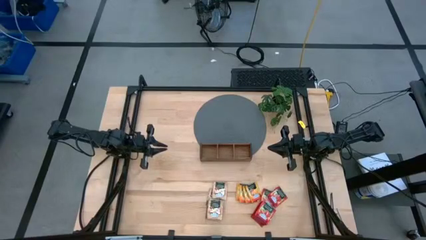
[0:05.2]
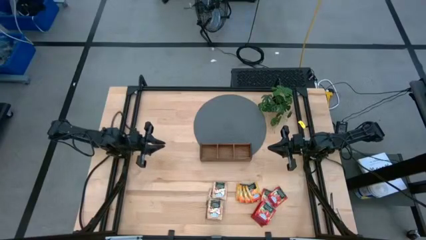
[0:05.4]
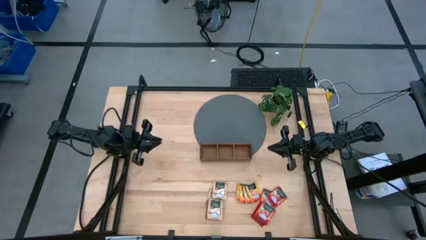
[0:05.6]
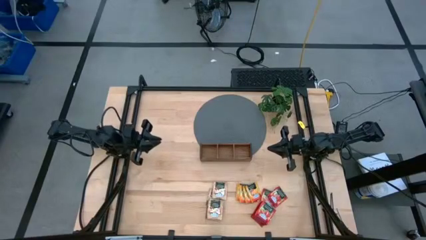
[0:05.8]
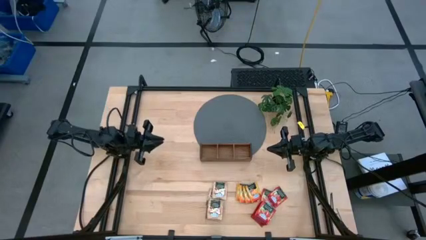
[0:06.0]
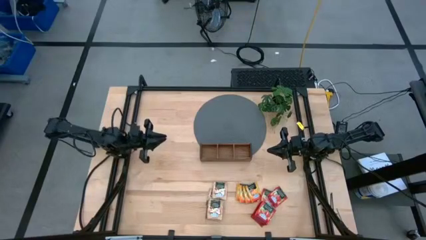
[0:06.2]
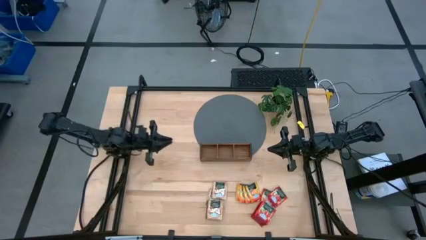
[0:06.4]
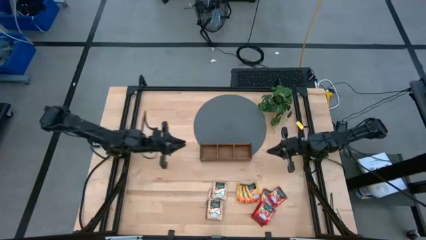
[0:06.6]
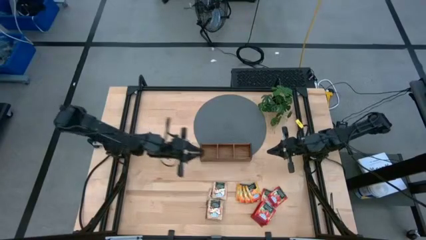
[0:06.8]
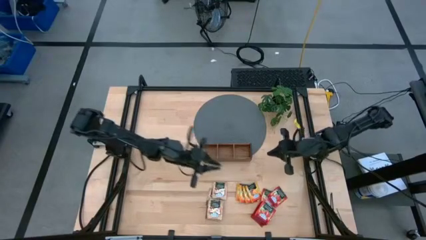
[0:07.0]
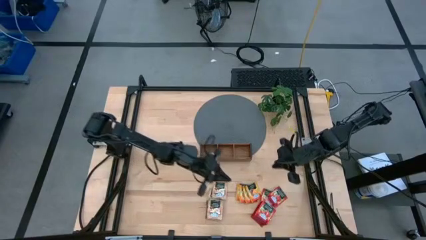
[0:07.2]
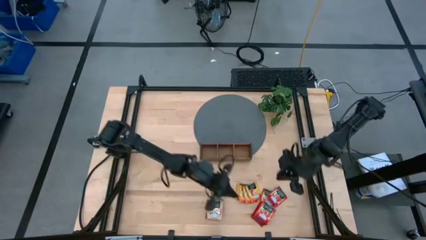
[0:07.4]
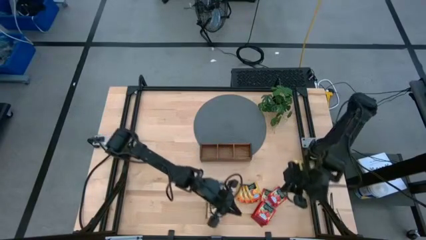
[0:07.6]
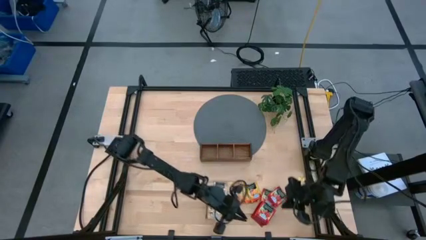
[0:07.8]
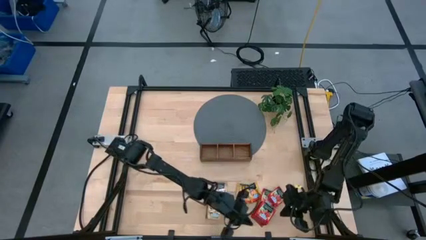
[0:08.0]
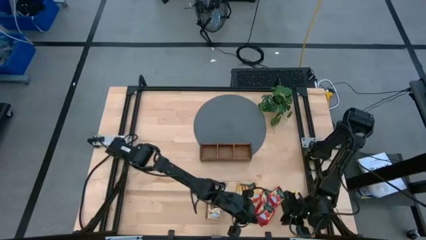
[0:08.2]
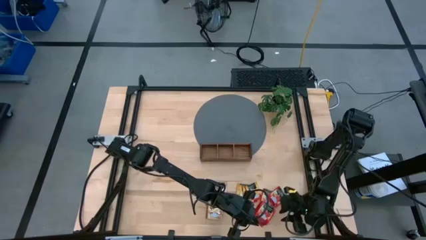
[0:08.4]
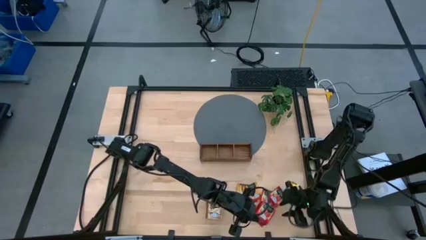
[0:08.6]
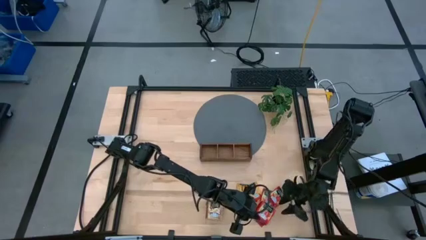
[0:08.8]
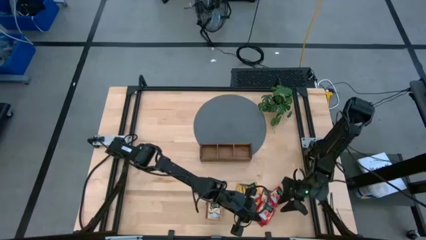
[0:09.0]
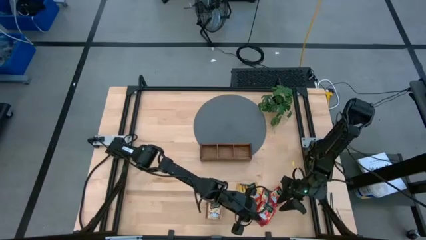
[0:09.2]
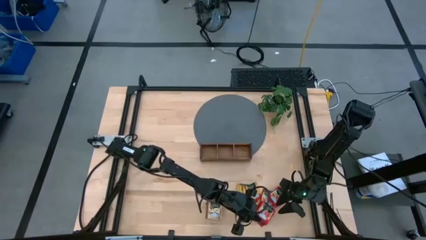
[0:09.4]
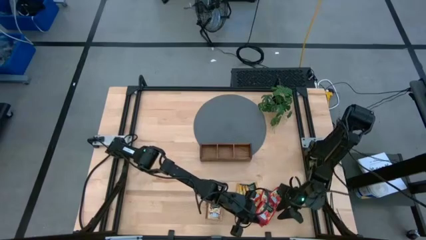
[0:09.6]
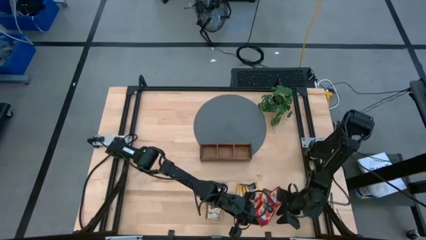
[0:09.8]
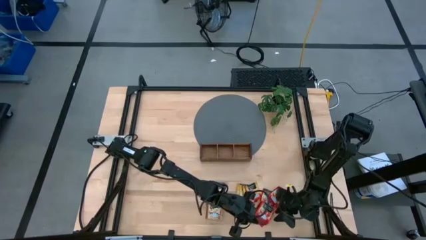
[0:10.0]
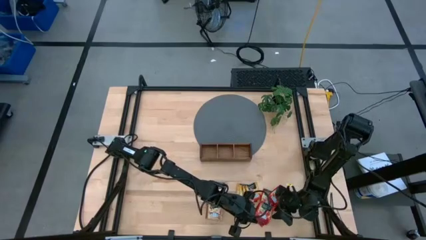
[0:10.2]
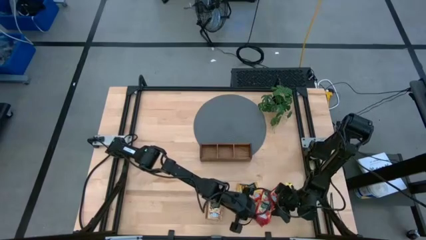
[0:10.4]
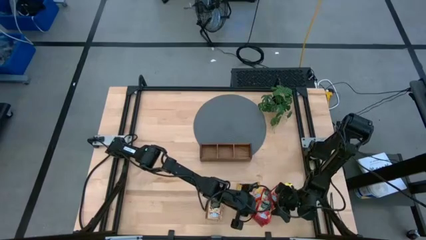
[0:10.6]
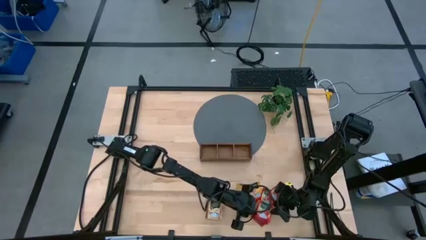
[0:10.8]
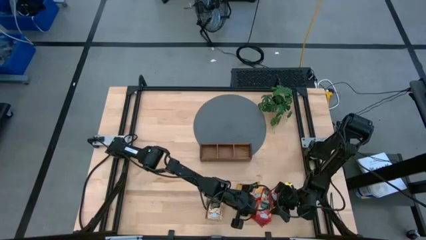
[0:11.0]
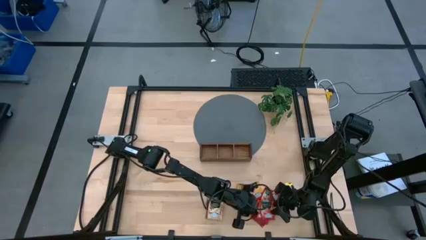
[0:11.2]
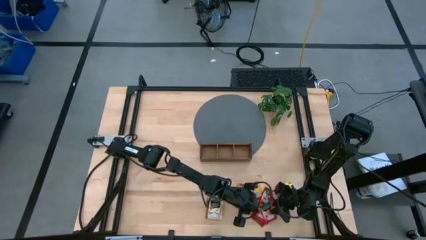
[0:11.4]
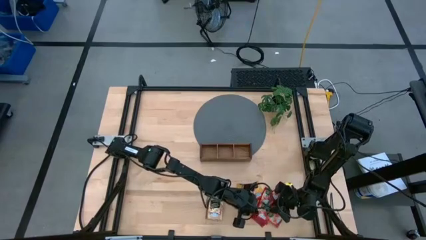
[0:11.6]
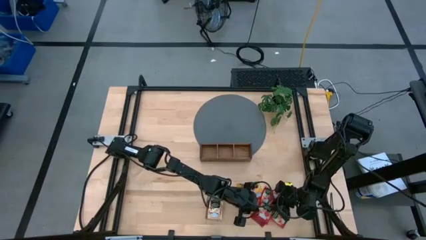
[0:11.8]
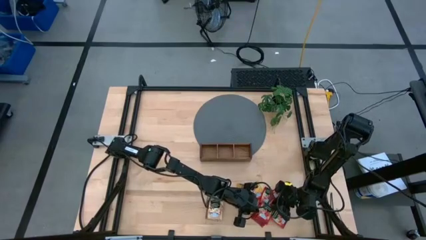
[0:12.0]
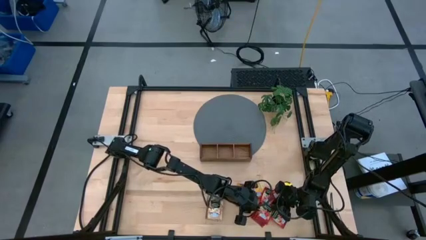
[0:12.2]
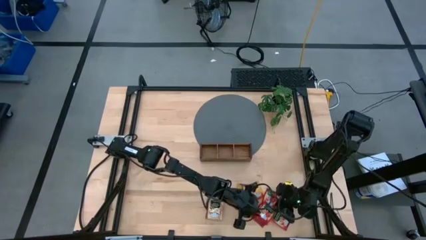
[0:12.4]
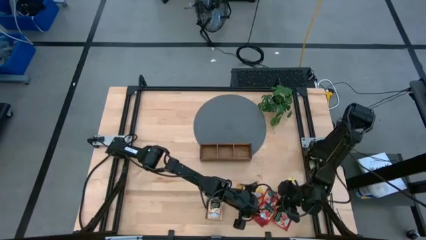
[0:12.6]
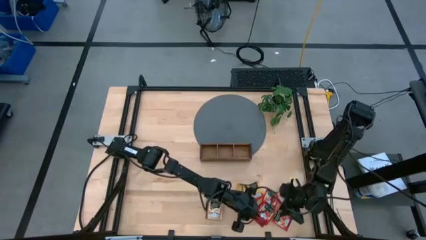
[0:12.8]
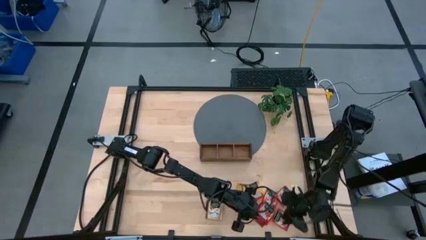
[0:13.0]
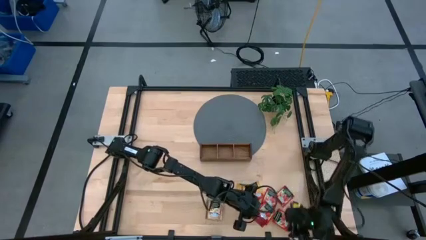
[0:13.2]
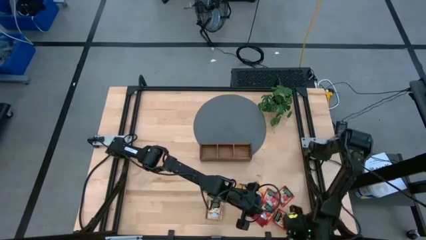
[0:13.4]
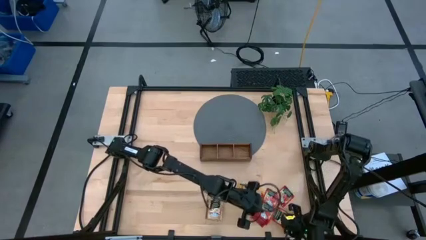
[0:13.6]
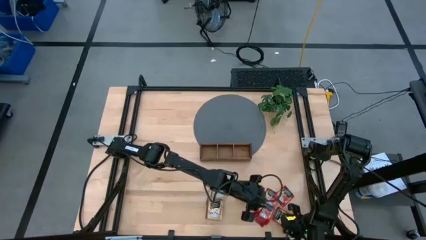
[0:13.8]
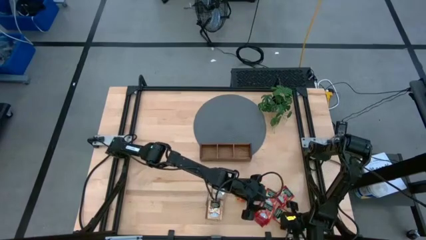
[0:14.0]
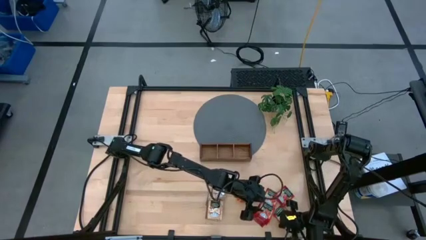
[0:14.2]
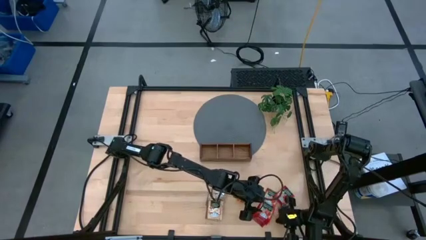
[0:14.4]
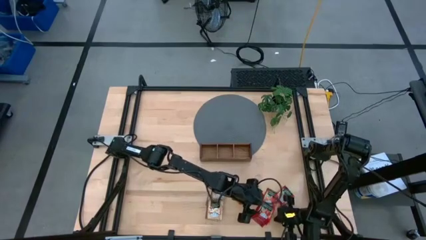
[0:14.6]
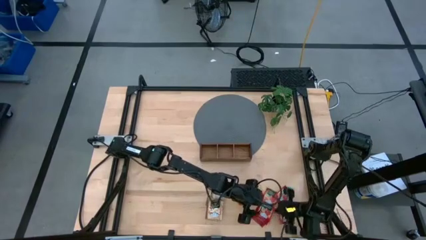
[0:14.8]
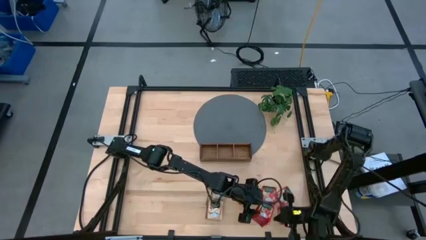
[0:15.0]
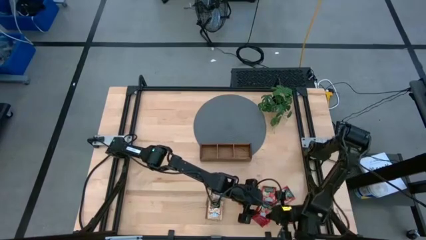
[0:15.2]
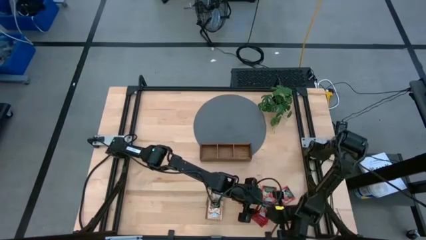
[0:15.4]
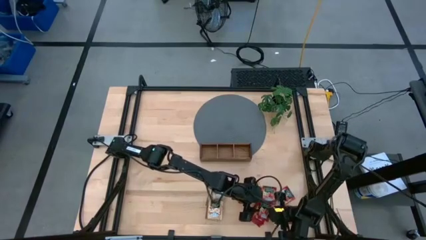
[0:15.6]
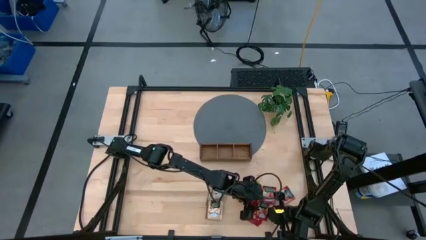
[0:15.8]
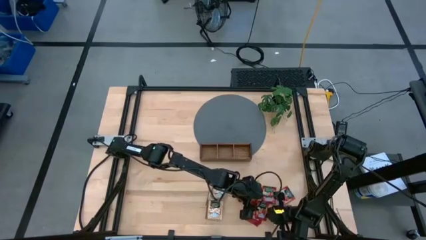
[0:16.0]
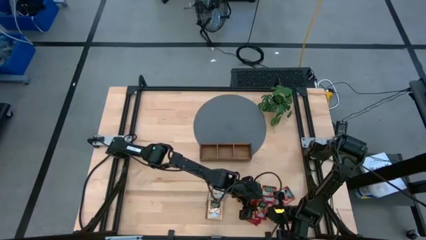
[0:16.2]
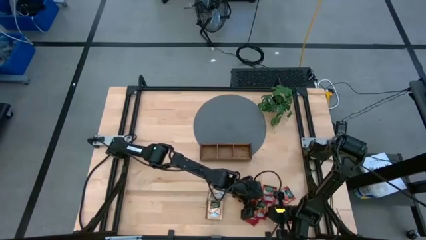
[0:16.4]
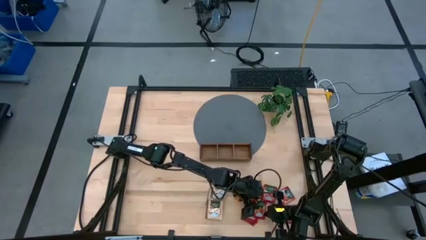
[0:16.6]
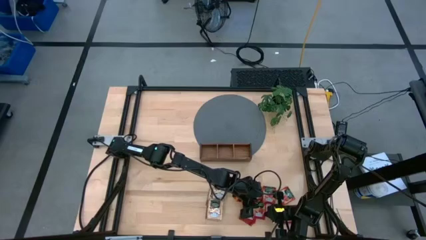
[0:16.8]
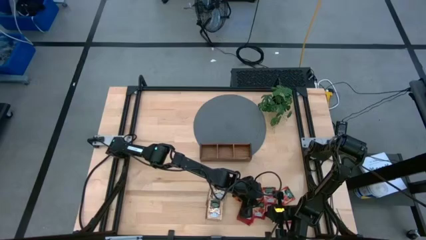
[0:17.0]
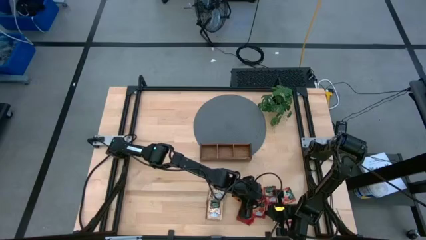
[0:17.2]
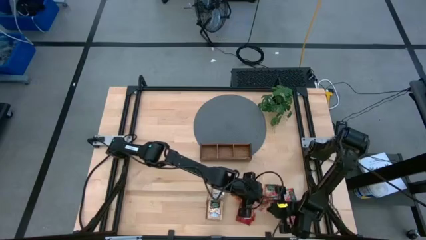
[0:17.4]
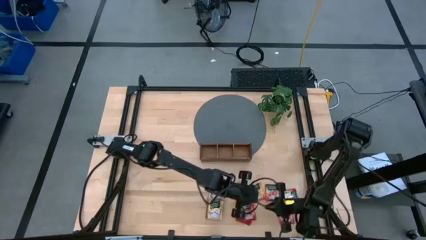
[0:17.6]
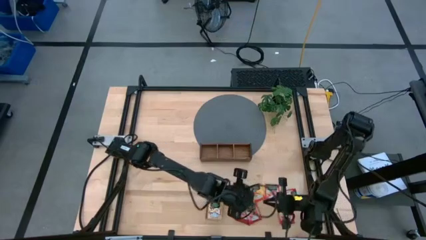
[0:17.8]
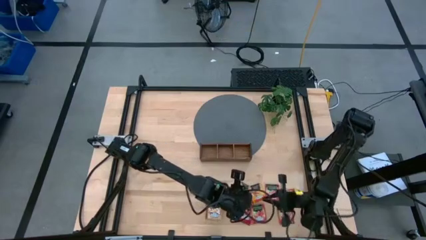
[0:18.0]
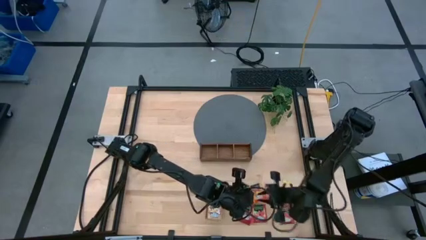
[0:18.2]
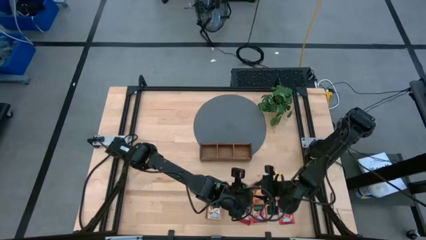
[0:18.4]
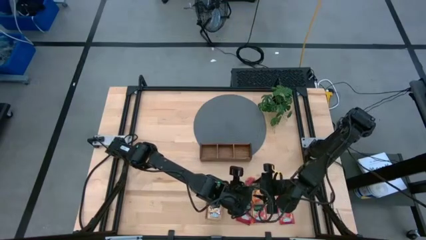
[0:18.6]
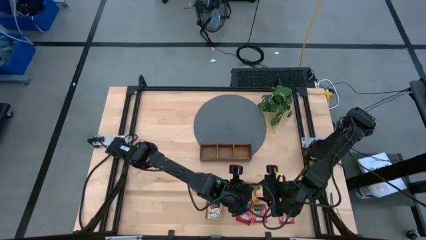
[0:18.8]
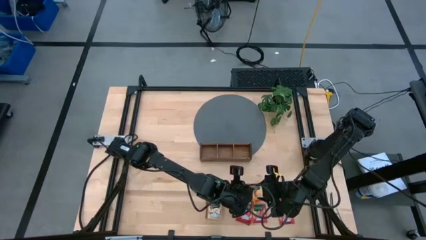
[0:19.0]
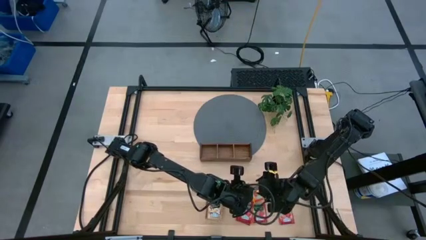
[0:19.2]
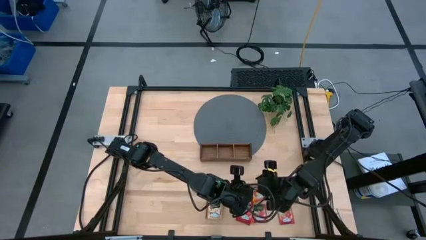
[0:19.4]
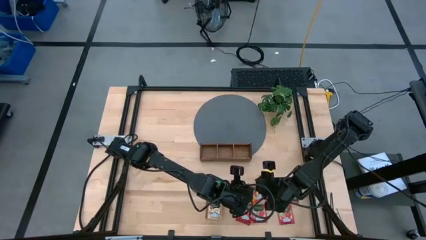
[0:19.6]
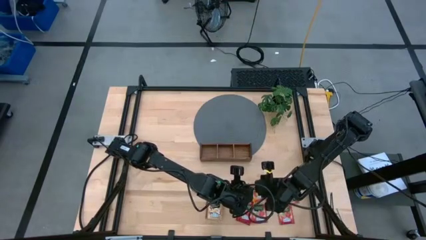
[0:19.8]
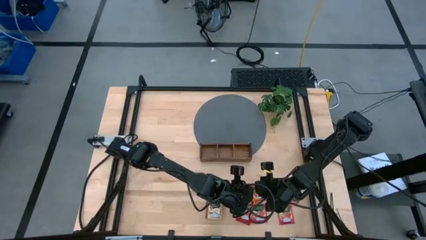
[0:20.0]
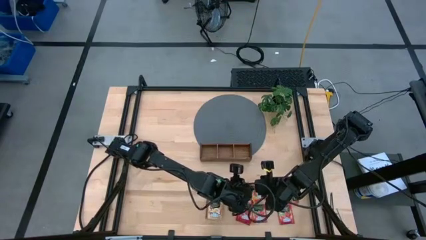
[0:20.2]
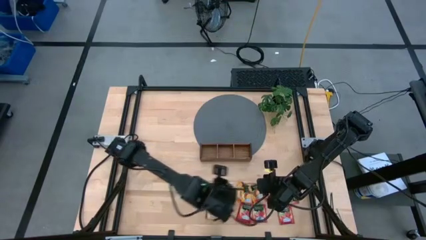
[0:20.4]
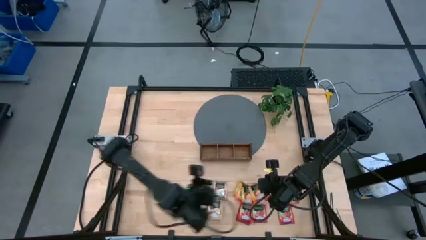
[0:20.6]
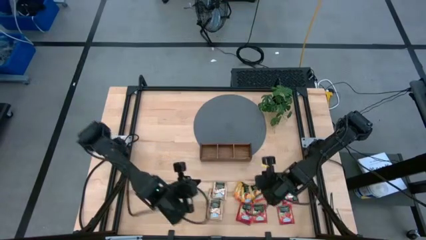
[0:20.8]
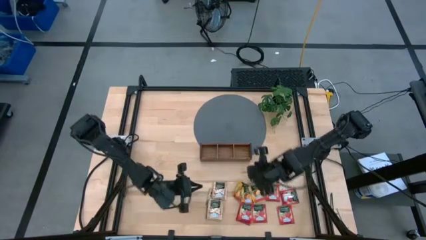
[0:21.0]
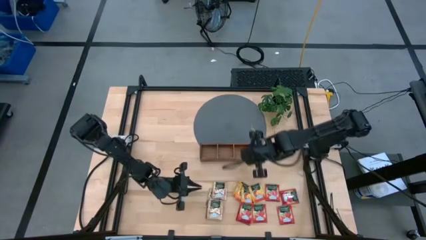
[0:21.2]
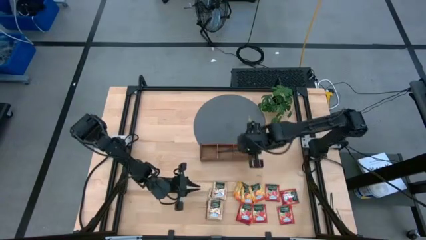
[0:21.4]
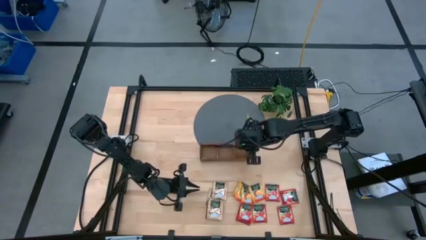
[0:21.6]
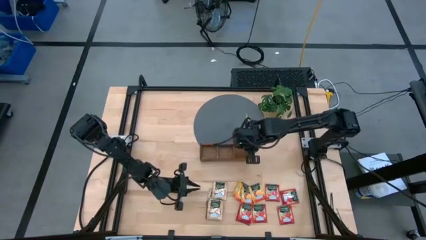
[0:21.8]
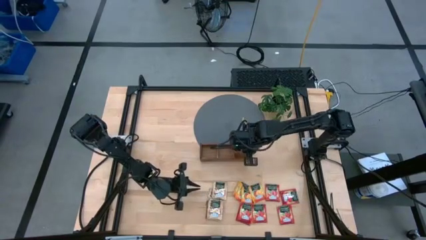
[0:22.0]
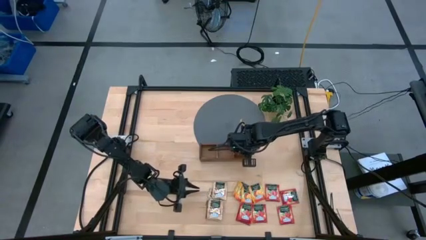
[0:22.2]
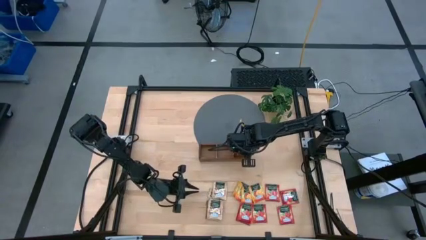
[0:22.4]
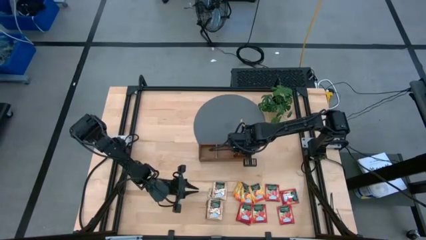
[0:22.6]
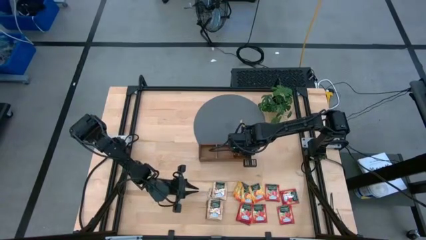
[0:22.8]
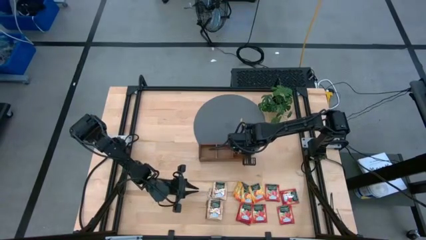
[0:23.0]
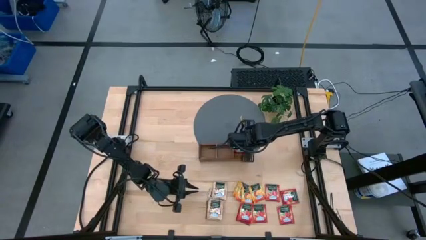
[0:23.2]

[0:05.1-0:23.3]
Task: Pick & Place Tea
Put the red tea bag into the right wooden organizer
